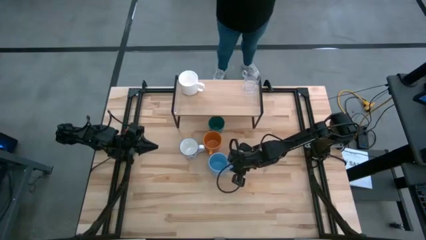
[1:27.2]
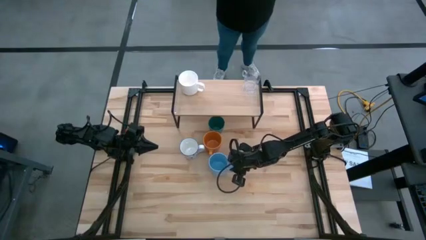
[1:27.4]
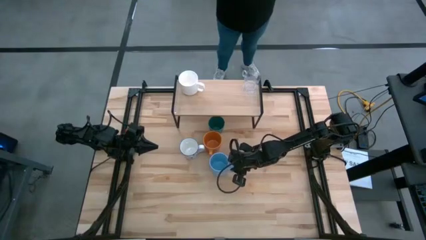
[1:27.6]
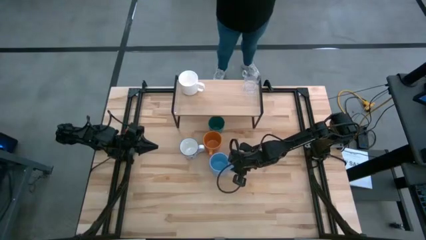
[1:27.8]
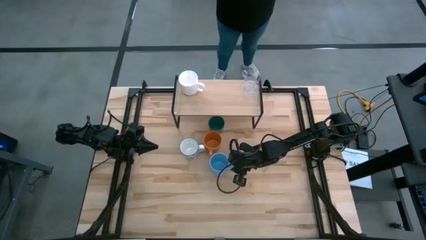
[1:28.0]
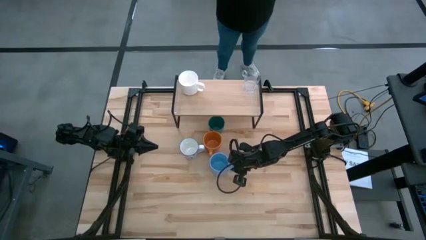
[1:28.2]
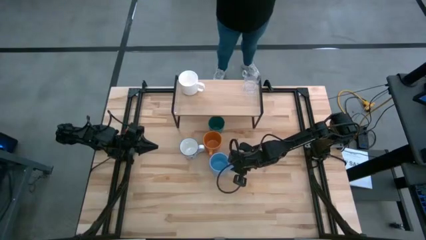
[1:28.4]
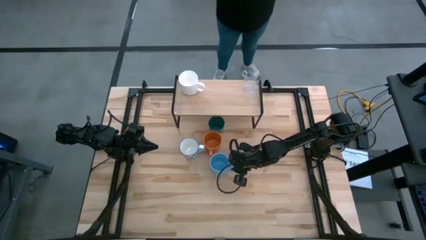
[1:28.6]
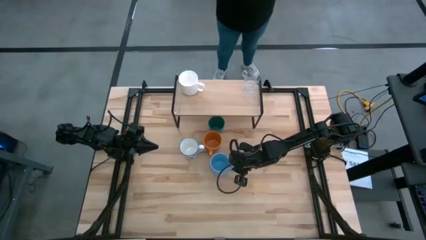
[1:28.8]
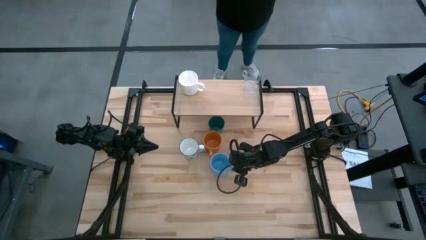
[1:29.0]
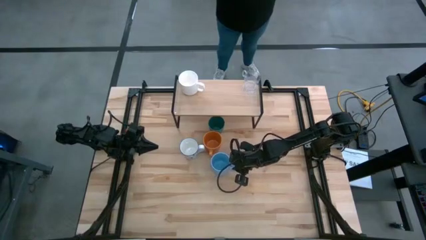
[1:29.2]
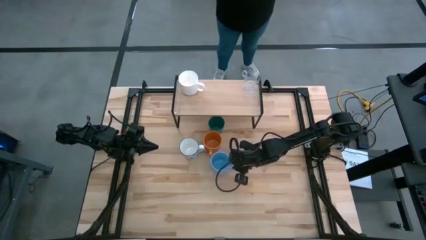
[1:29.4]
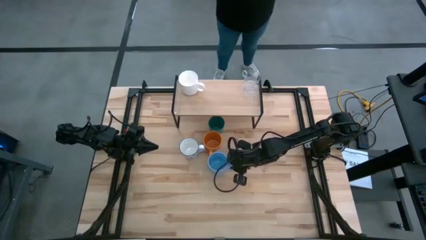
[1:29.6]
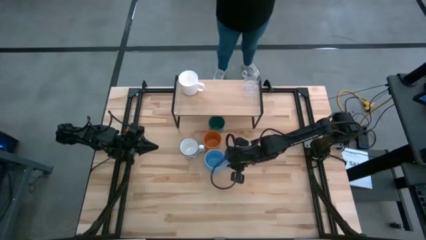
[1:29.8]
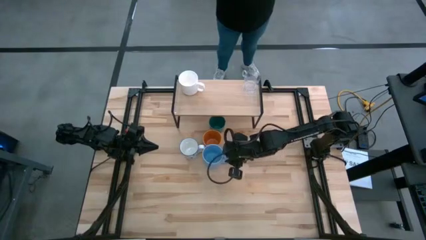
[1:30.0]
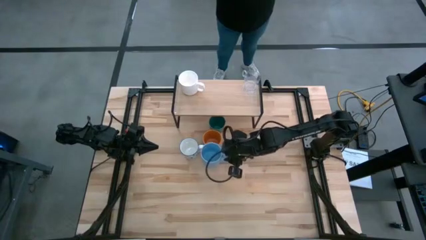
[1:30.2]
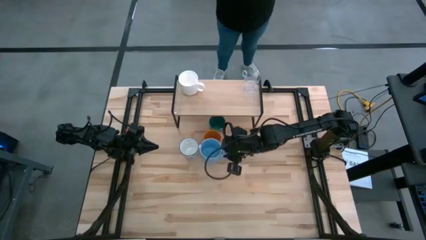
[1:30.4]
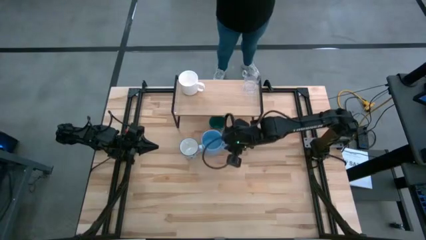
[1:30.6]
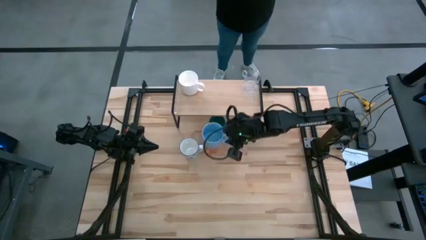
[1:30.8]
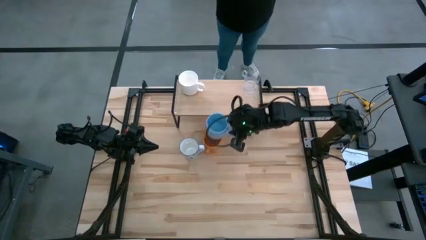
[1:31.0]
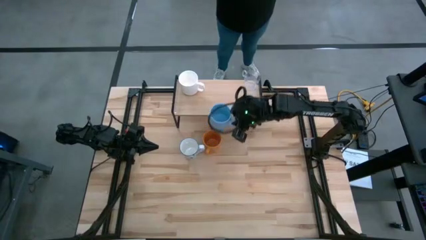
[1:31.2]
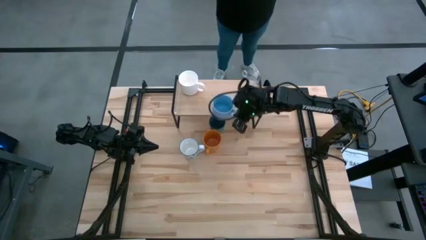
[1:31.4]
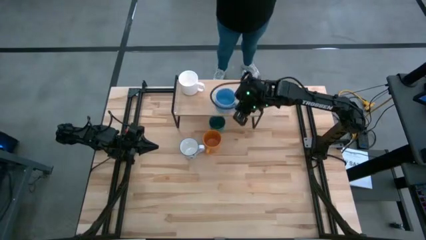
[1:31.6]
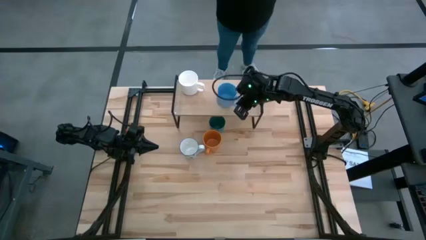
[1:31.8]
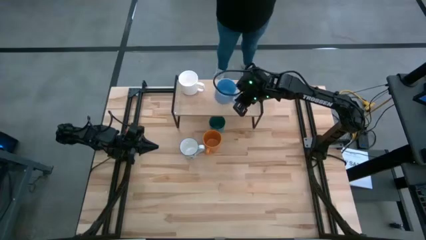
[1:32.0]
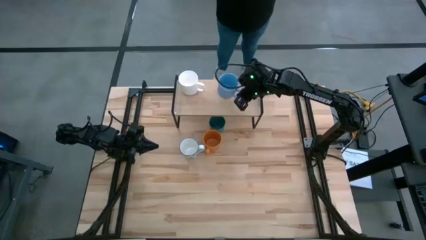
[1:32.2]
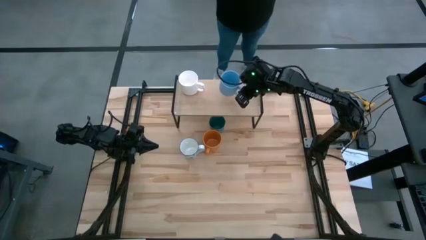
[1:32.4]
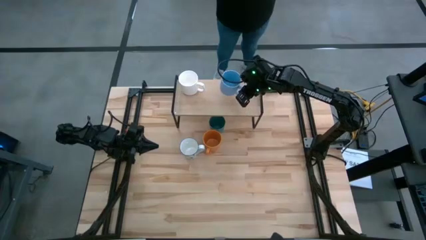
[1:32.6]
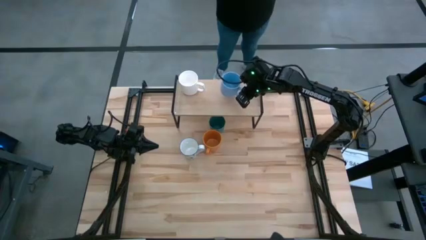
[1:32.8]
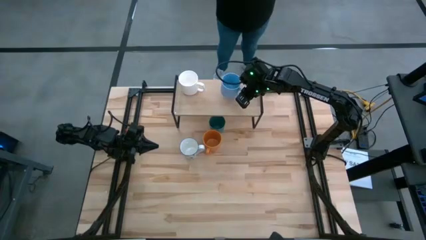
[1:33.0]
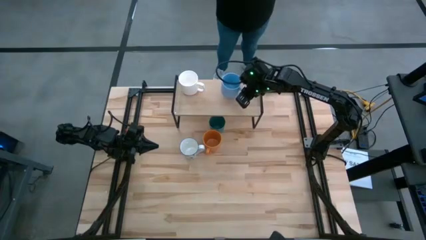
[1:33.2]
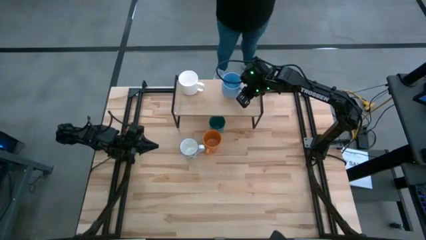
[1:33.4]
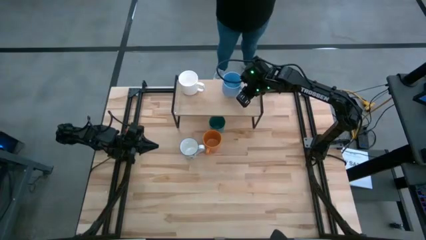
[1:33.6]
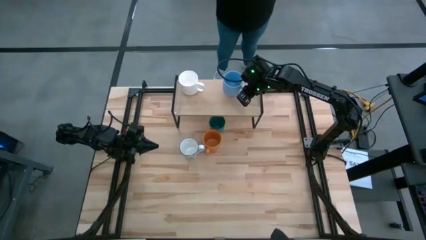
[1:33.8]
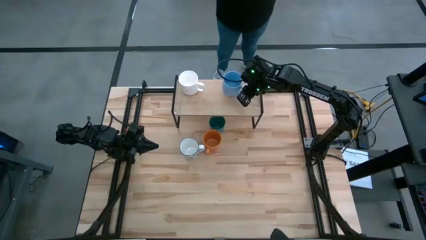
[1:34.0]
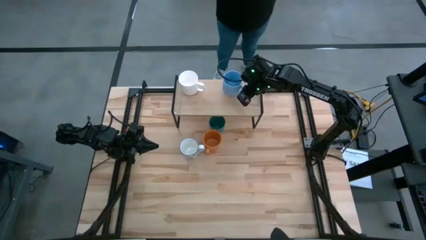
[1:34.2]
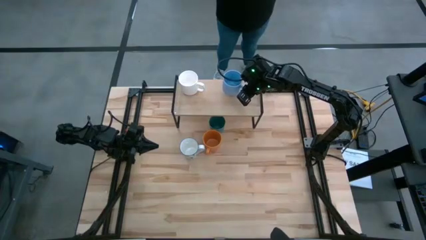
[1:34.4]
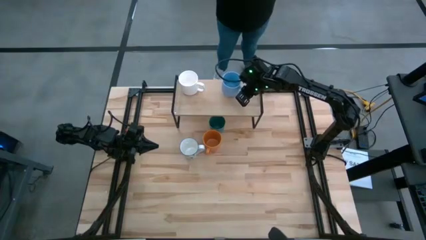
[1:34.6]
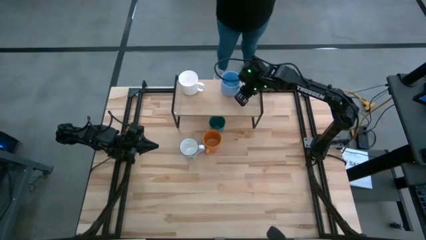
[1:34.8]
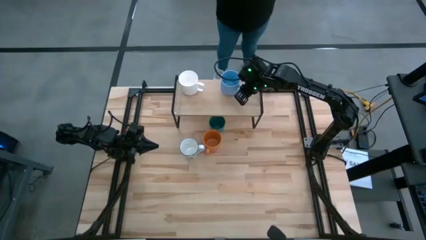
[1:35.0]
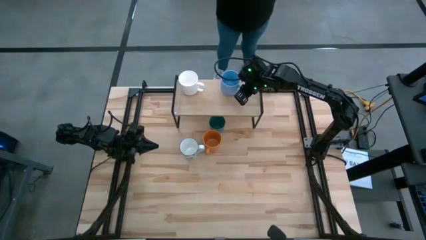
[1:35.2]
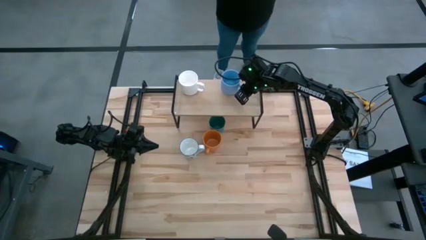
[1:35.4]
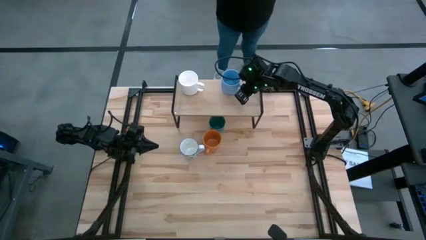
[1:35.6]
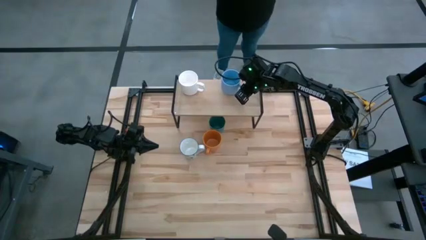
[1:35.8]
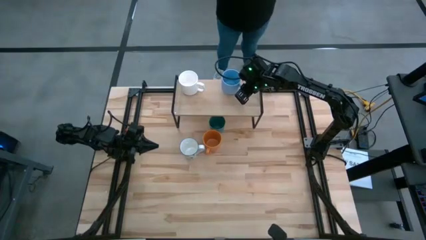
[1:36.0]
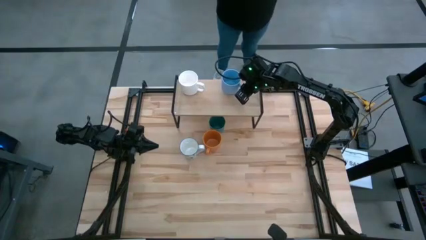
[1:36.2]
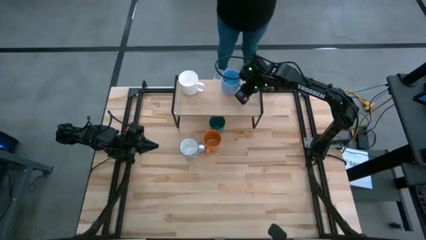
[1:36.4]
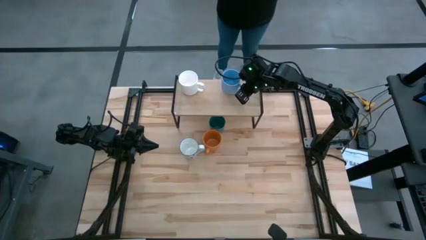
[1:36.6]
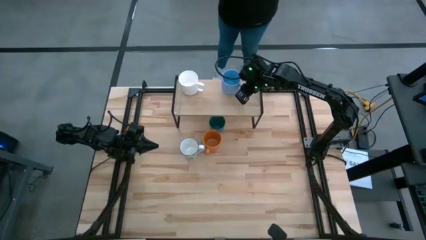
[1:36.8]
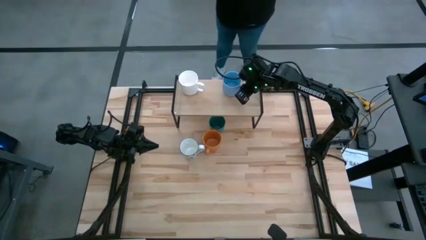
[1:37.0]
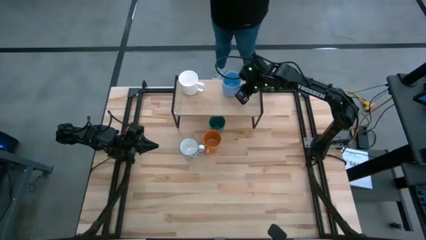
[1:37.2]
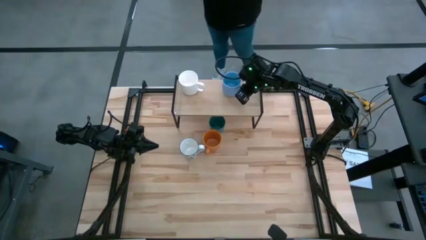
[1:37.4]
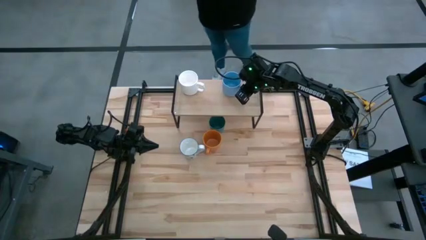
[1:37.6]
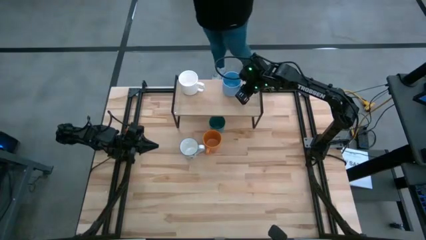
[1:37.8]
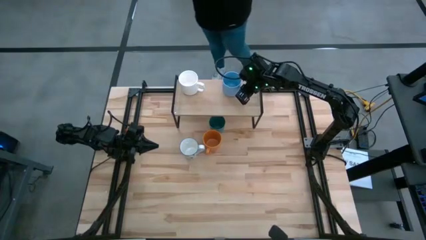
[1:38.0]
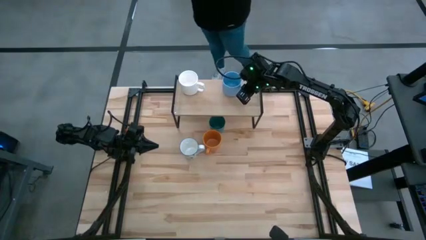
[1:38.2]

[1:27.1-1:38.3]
Task: Stack small to large cups/mugs on shelf
Put the blue mug on the shelf

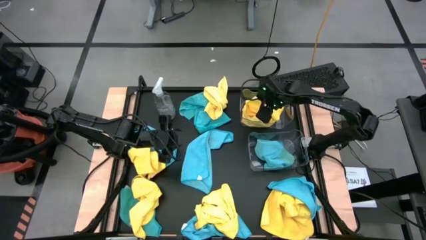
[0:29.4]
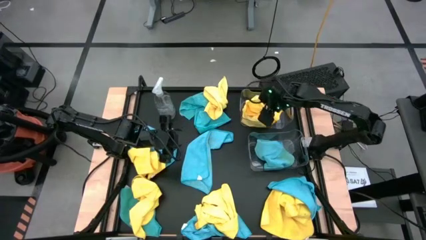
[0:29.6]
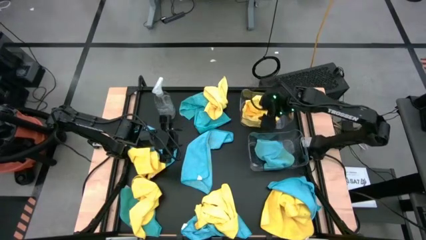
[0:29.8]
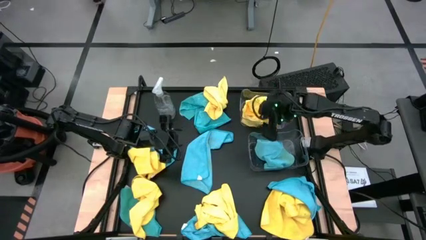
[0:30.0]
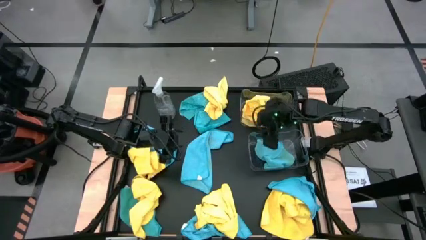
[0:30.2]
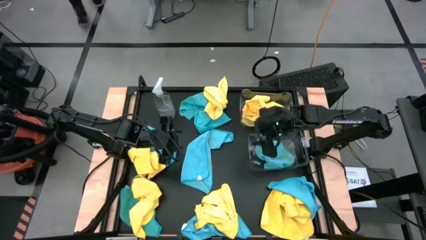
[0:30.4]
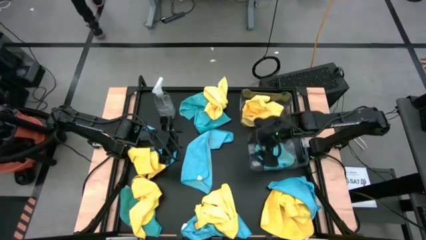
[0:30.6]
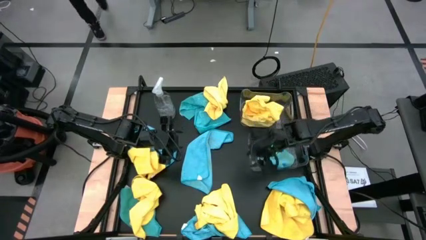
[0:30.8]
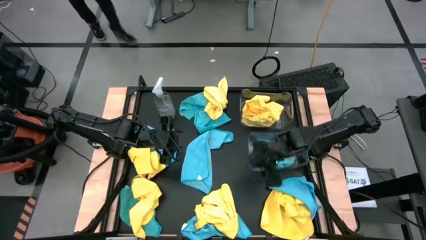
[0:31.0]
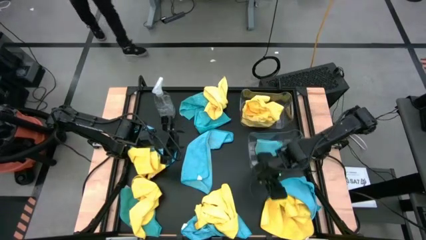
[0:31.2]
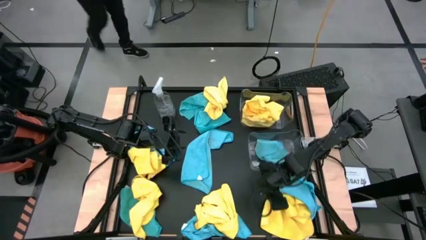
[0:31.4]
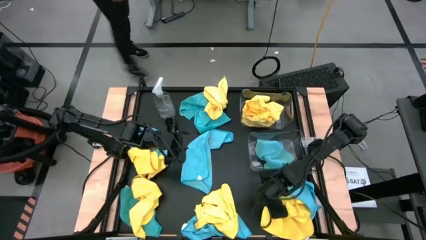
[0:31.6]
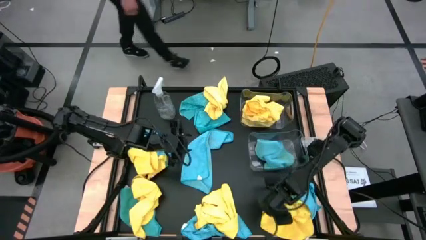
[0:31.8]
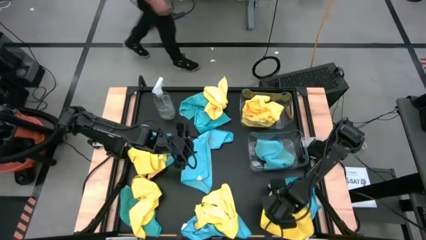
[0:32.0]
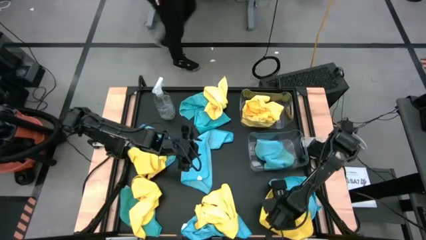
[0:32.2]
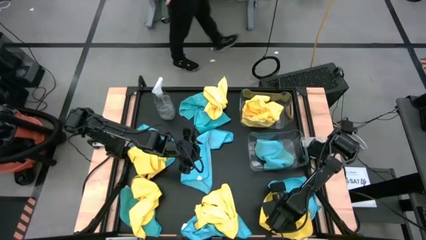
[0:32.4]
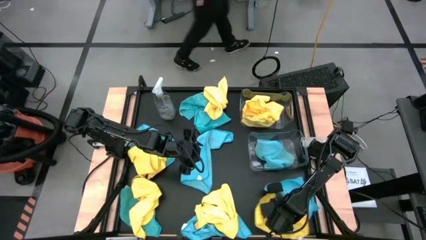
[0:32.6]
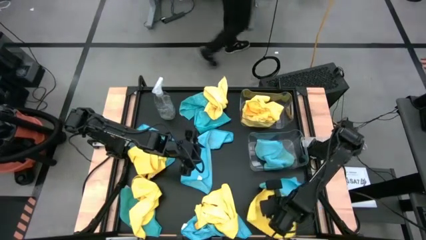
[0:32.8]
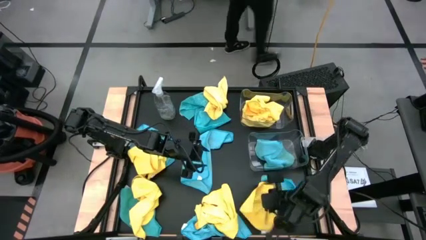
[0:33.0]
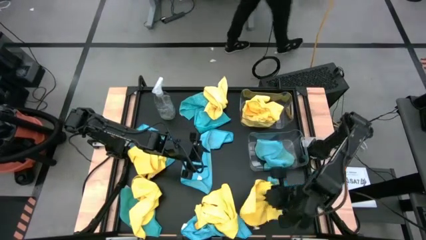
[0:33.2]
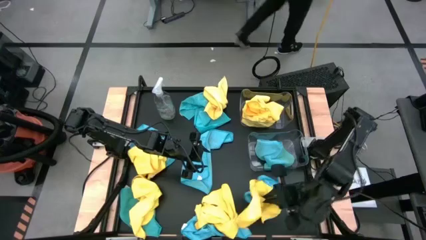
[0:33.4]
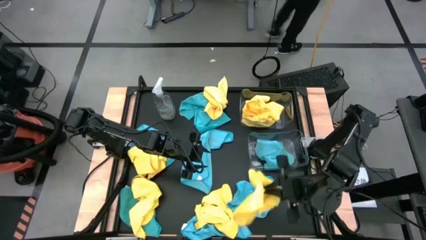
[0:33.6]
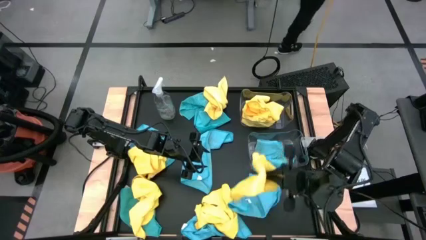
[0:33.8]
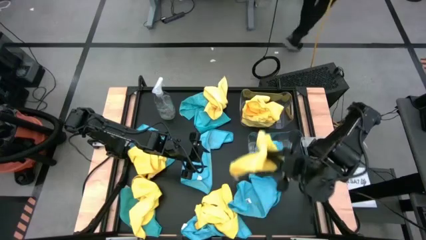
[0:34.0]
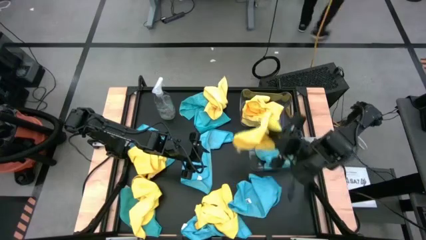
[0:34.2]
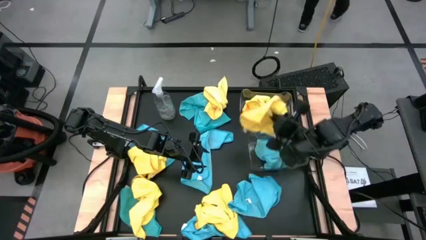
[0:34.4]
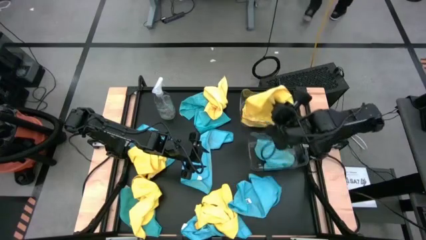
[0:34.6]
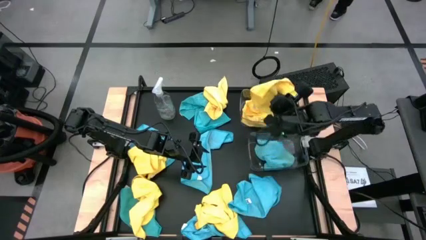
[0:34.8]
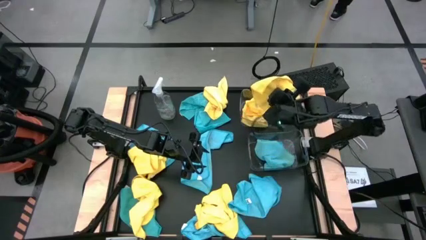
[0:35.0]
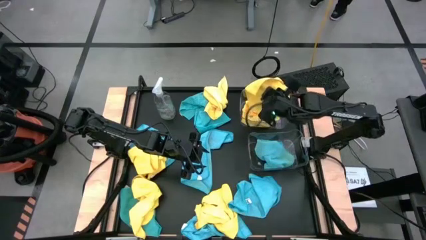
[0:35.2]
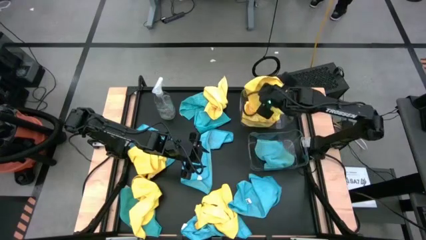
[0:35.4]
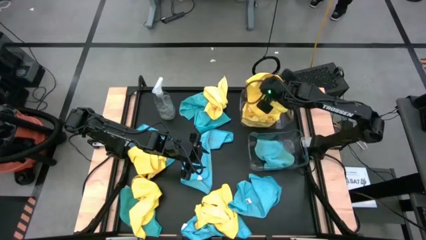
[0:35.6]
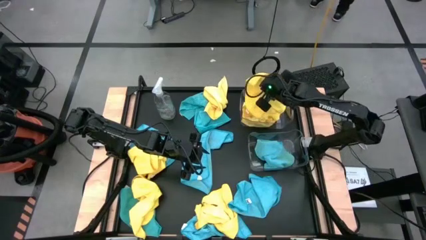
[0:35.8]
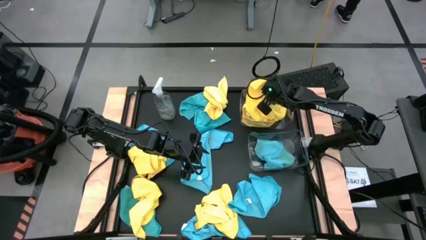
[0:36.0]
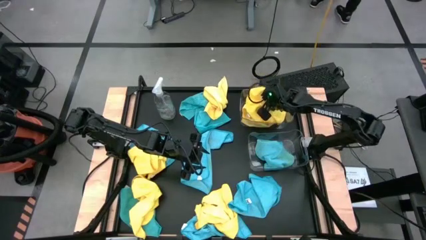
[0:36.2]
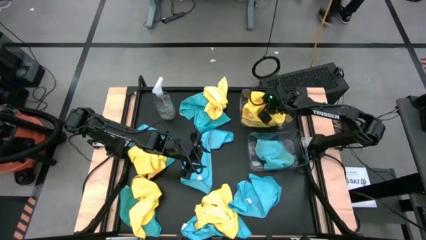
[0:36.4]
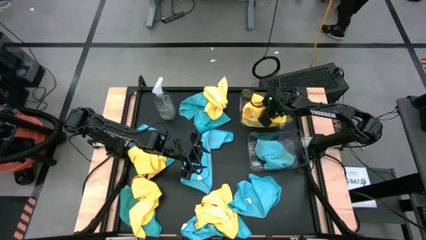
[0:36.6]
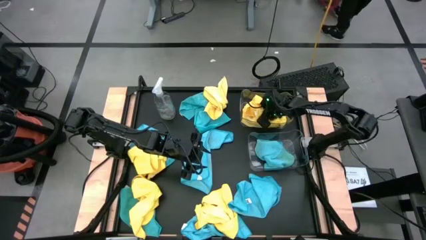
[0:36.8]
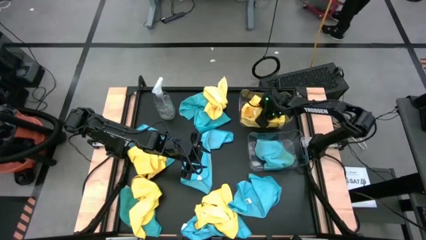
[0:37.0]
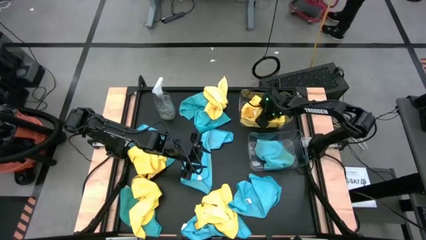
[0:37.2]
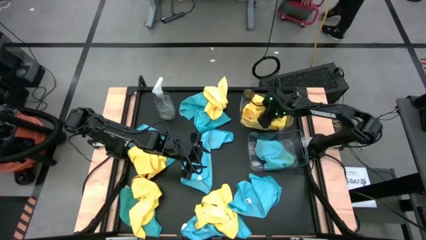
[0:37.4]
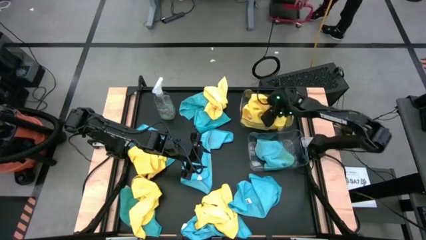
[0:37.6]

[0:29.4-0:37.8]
Task: Sort microfiber towel by color & place in baskets
Put the yellow microfiber towel into the top transparent bin
